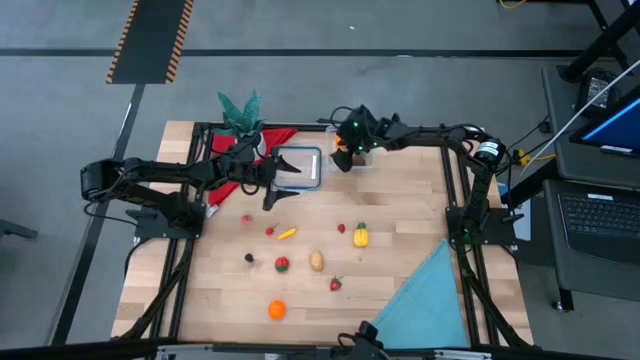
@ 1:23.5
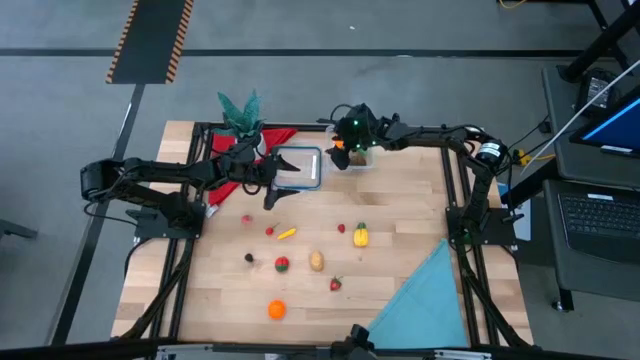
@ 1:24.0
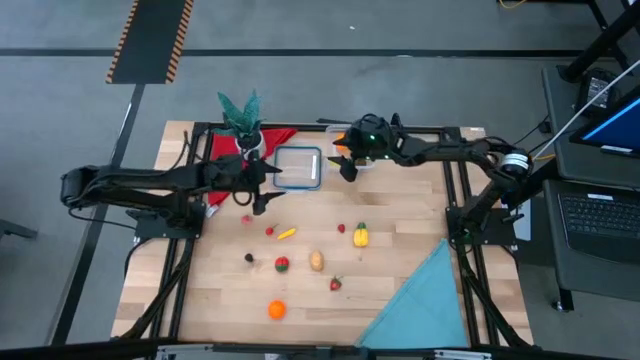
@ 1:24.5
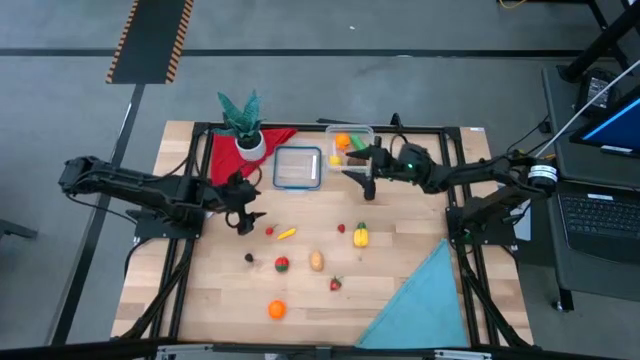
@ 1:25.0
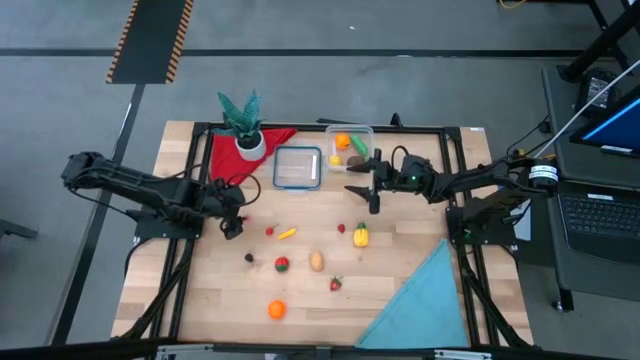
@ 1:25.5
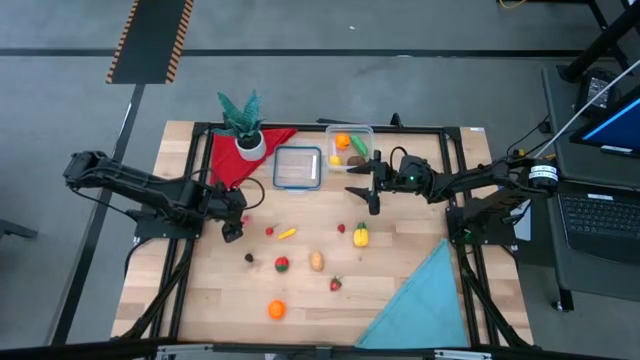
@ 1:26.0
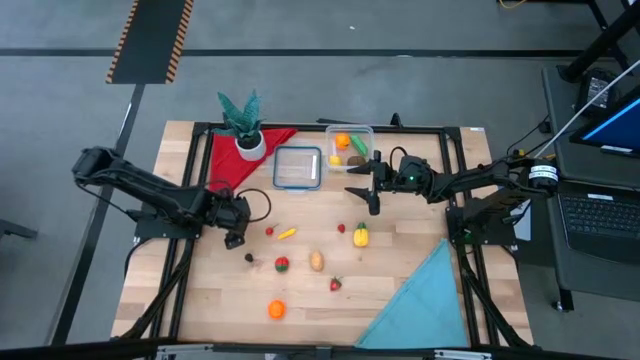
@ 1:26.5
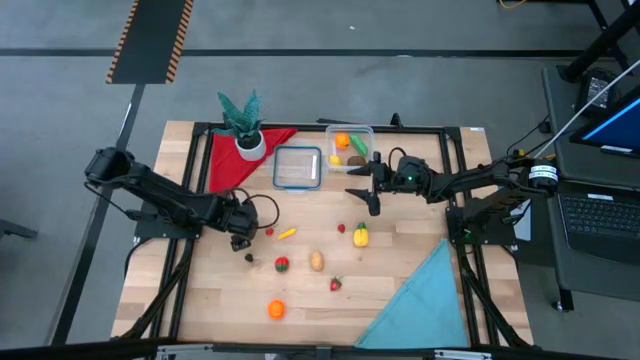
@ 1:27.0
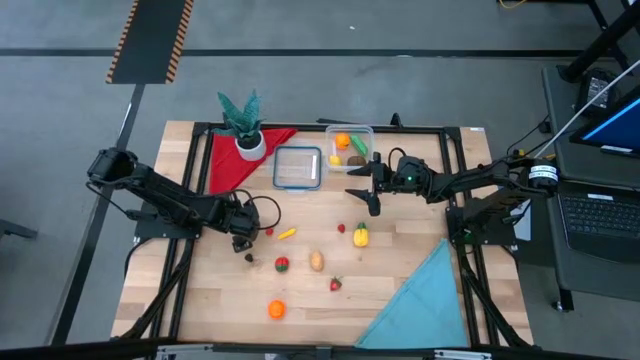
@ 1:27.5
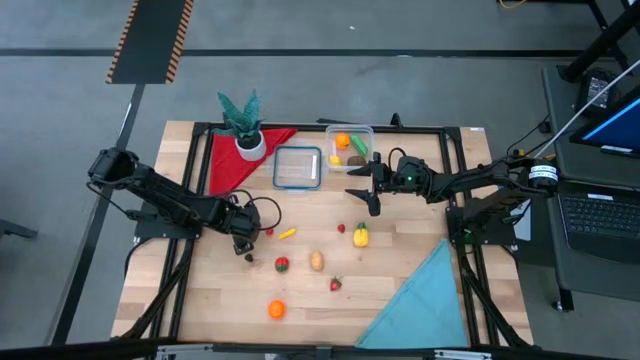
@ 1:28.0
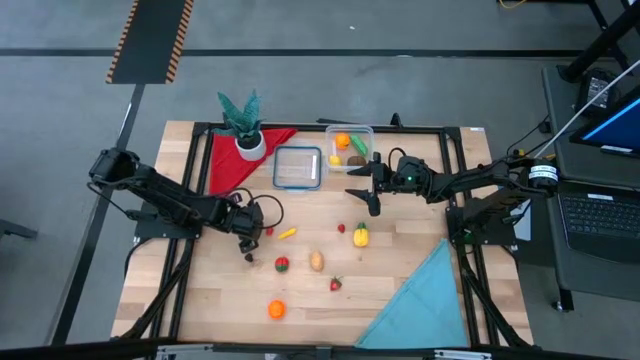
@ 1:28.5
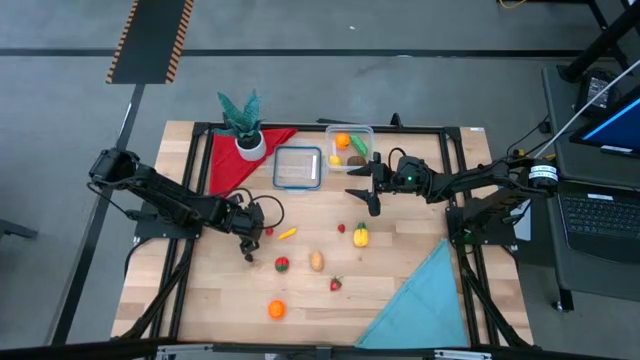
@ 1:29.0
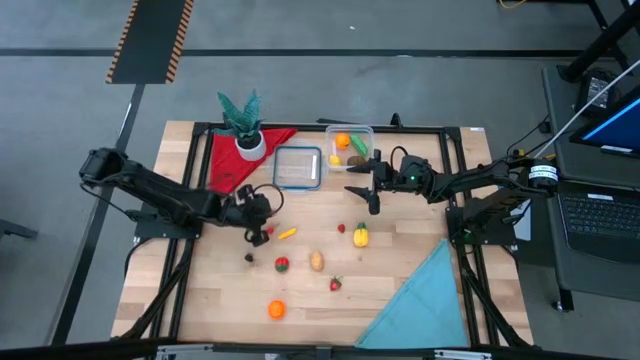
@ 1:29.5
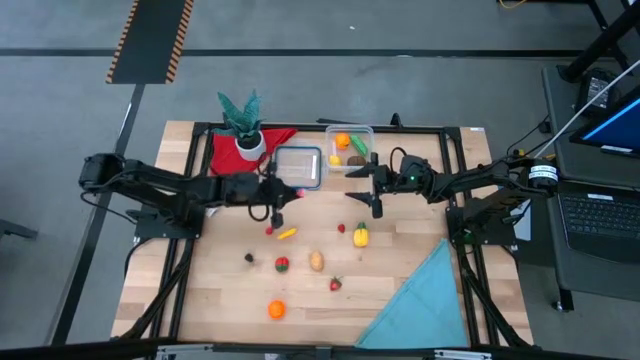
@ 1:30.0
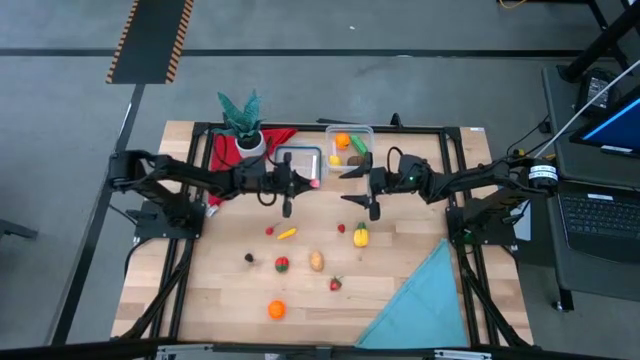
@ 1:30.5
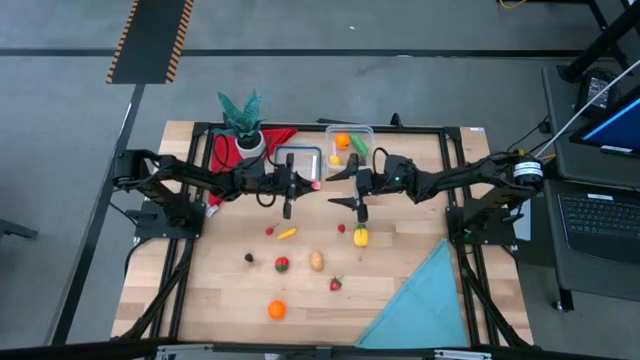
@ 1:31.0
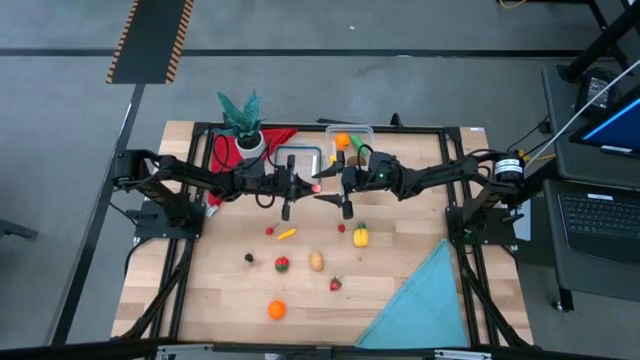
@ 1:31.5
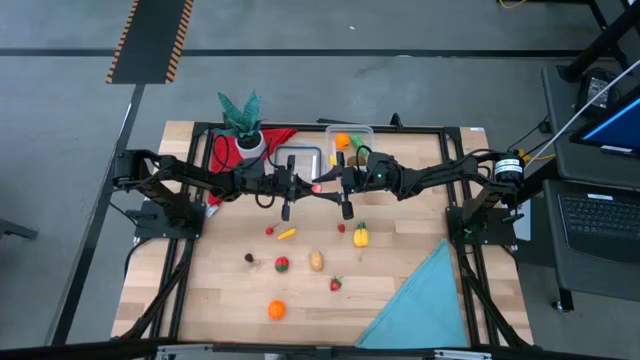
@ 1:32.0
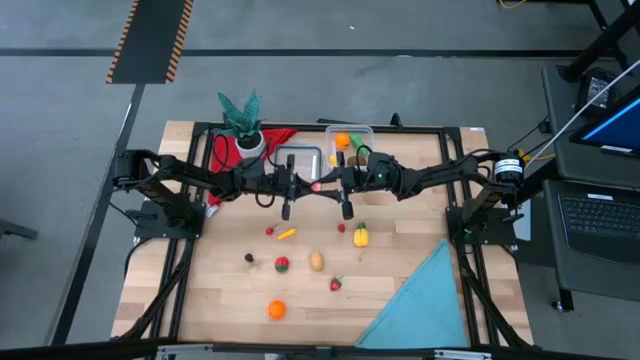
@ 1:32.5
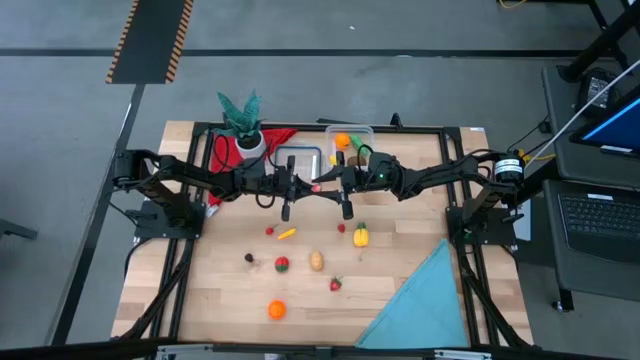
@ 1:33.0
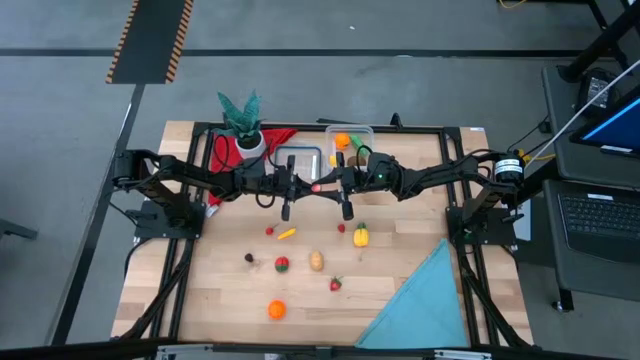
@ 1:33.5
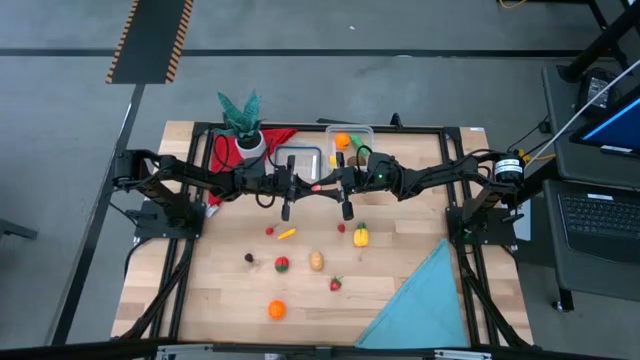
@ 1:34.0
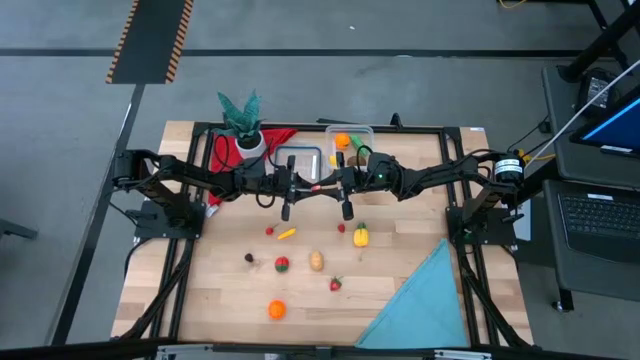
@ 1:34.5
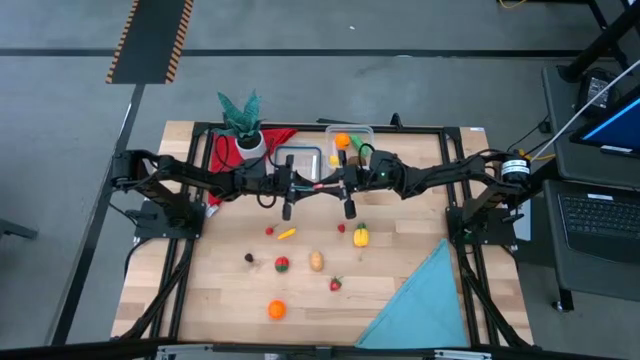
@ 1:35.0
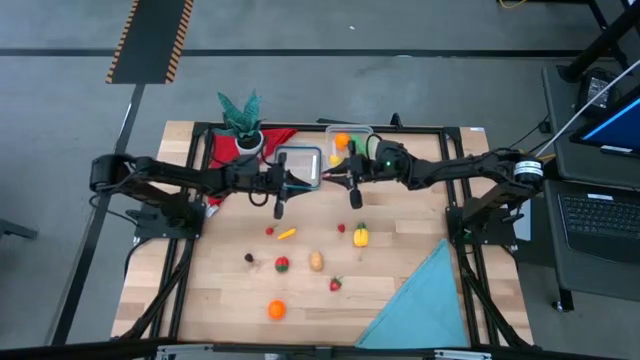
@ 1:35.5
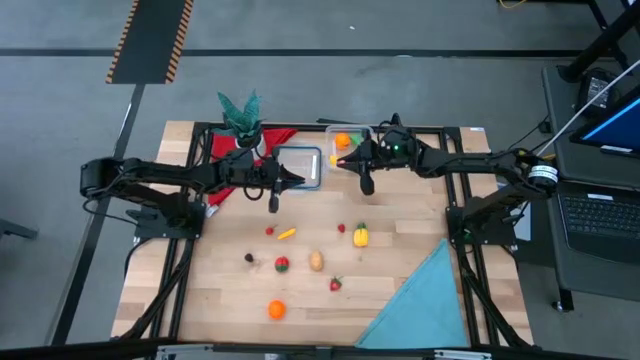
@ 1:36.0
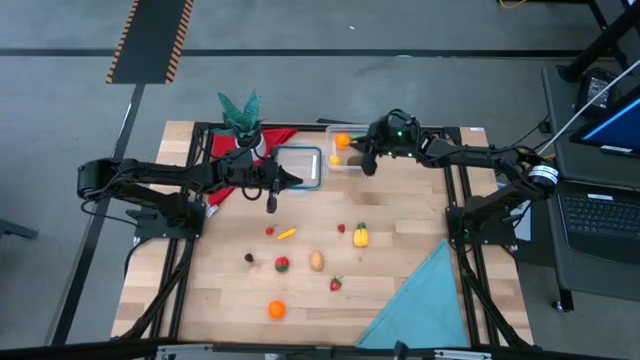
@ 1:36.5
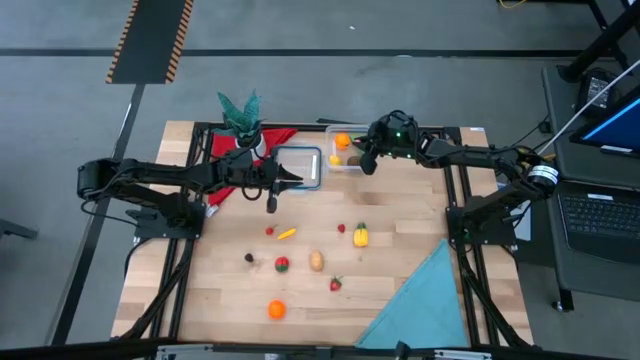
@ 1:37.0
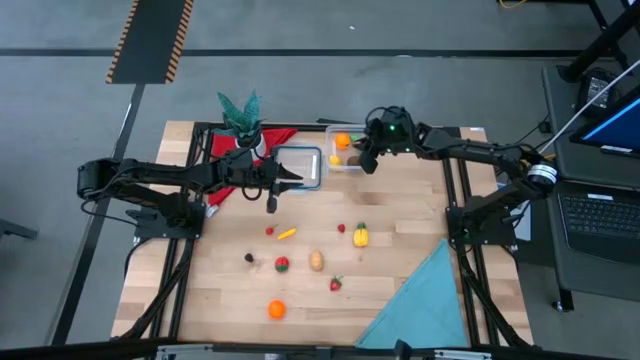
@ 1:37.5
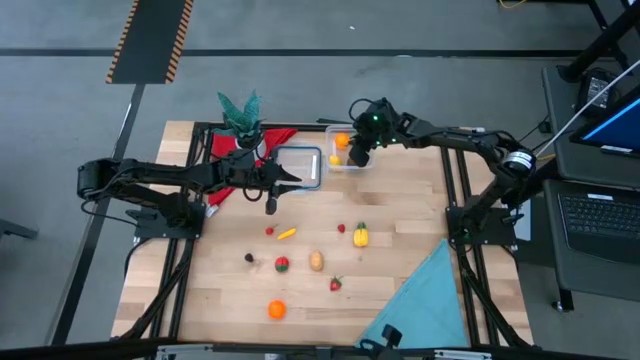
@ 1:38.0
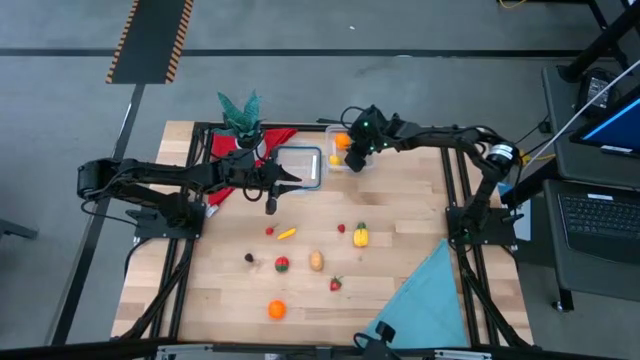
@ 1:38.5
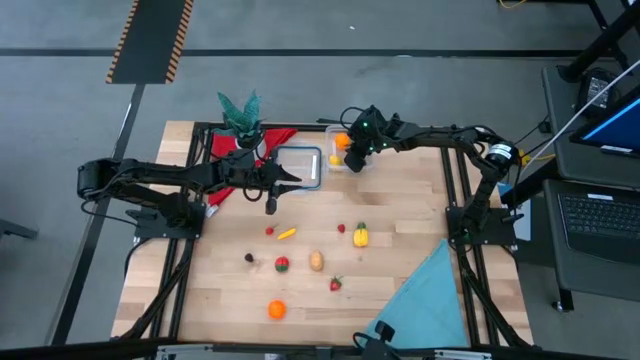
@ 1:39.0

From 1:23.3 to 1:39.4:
Task: Pick and placing Produce into tupperware
Put the peach into the transparent bin

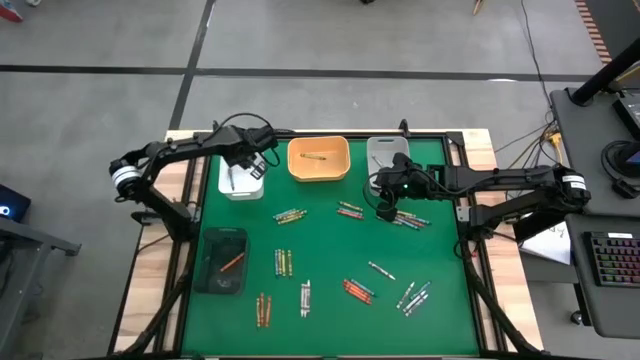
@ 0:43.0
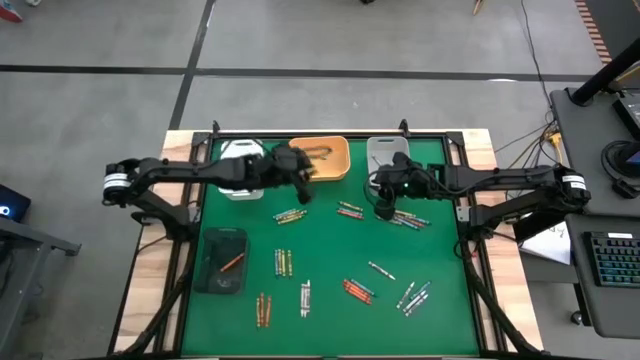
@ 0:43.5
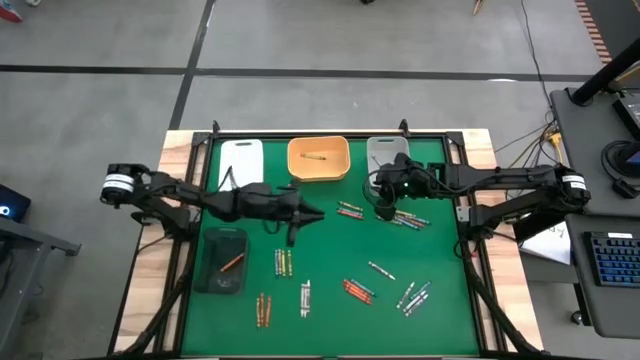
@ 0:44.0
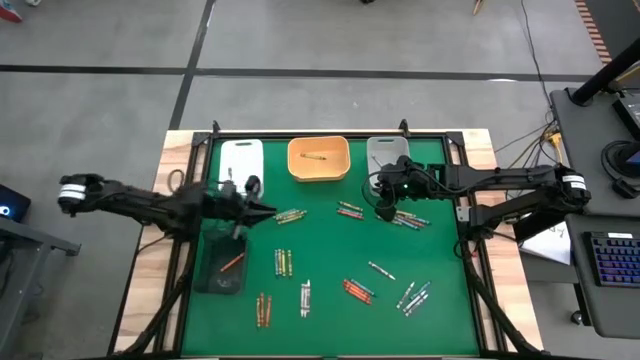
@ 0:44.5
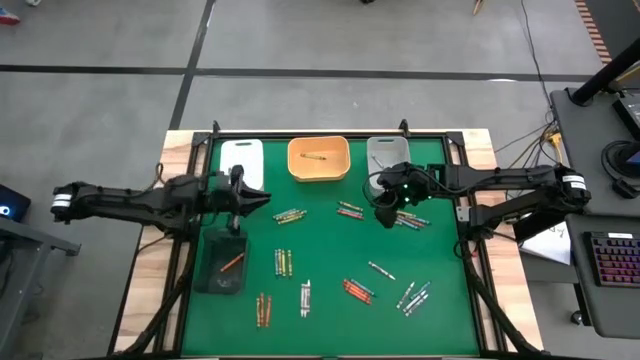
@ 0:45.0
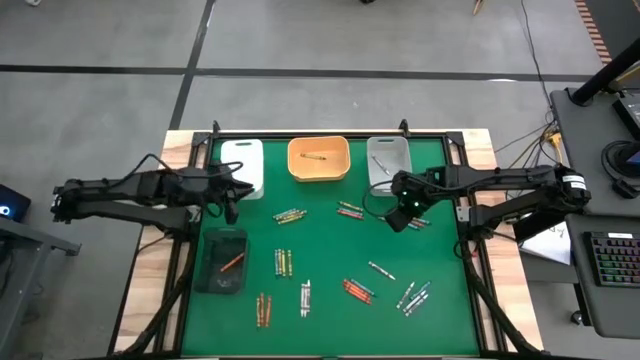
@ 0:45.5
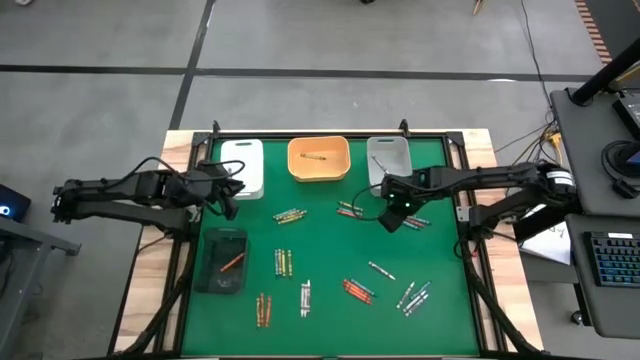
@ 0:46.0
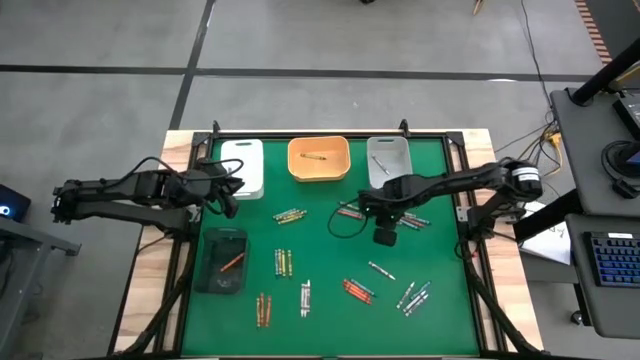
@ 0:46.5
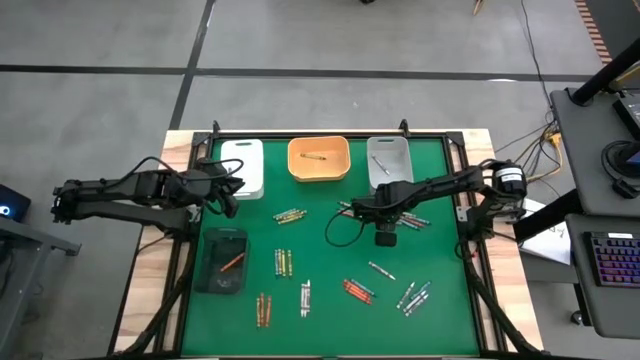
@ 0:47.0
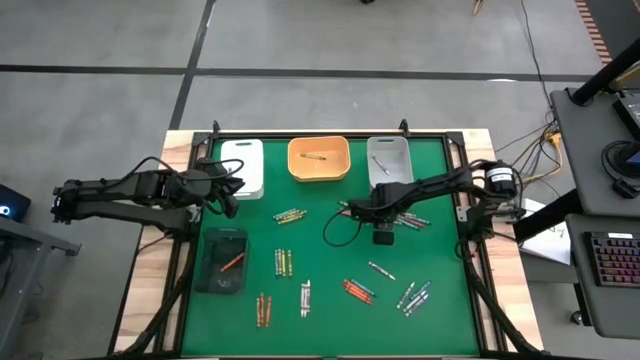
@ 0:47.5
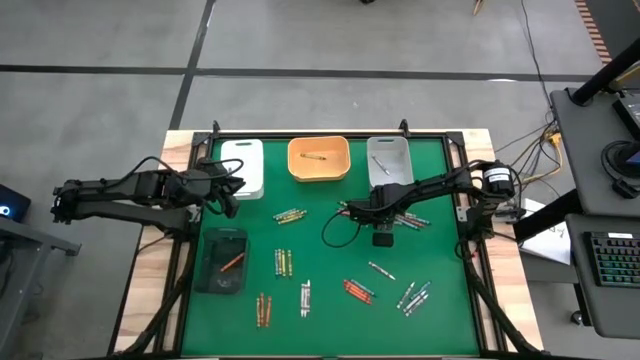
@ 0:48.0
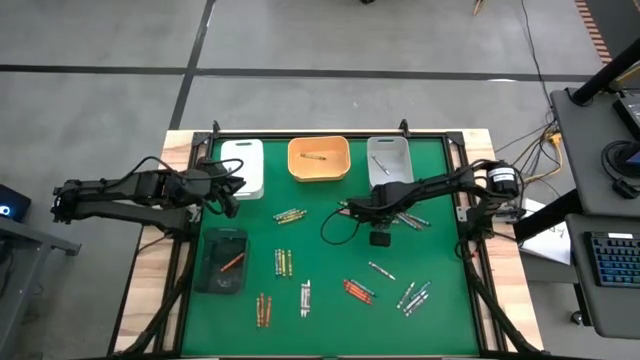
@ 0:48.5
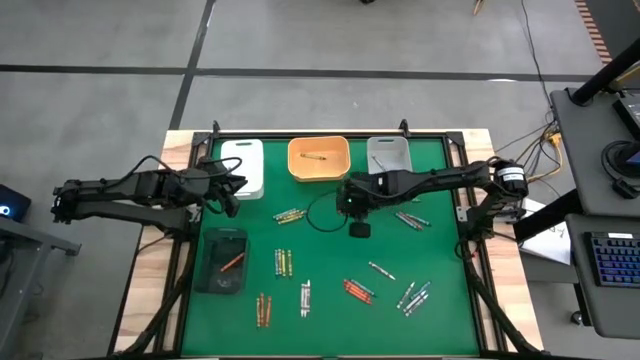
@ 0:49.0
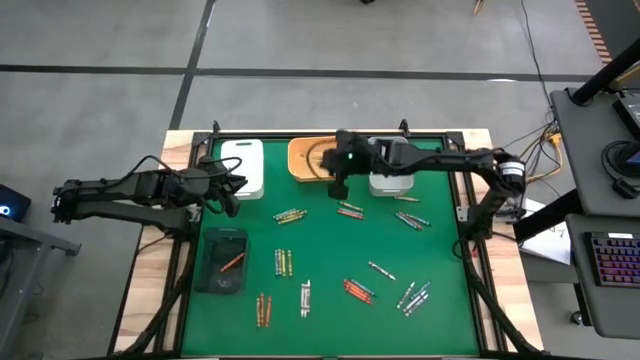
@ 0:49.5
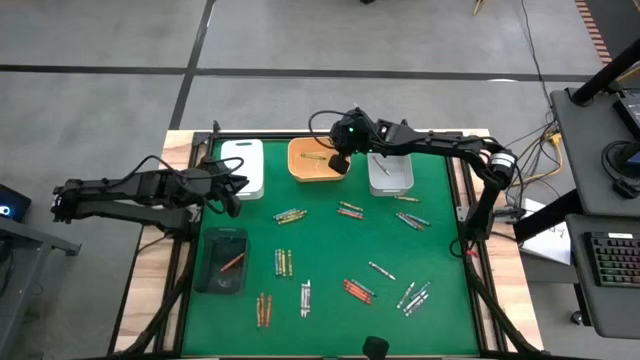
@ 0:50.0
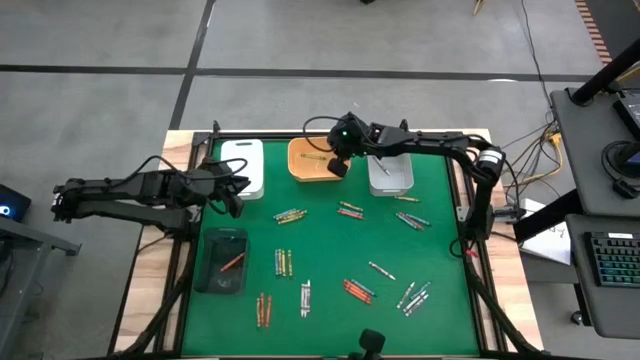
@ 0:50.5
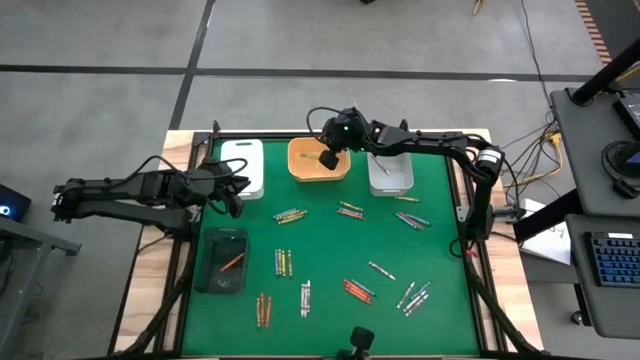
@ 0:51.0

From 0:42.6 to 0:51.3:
Task: Sort crayons
Put the green crayon into the yellow bin
